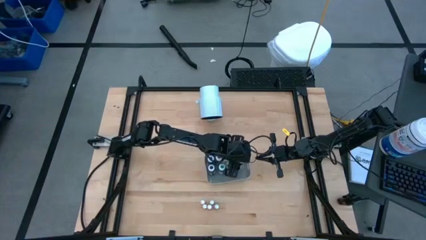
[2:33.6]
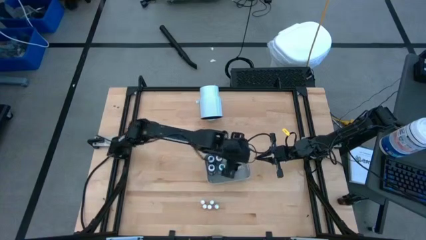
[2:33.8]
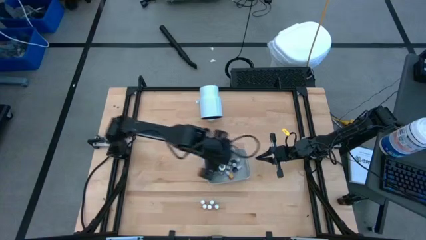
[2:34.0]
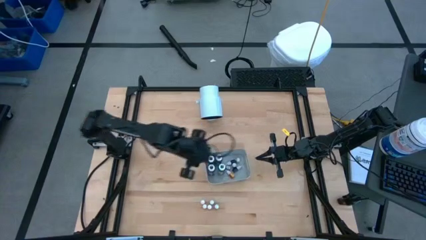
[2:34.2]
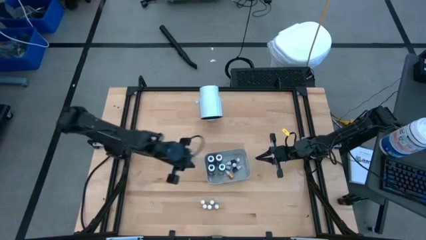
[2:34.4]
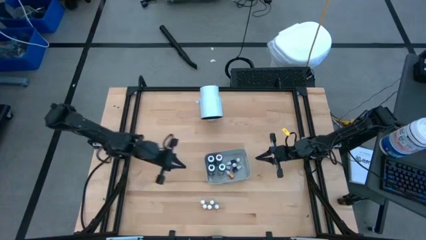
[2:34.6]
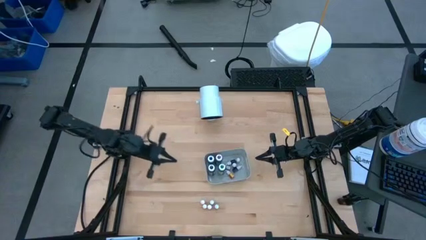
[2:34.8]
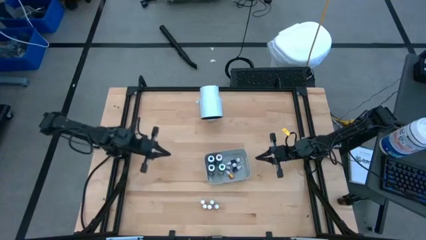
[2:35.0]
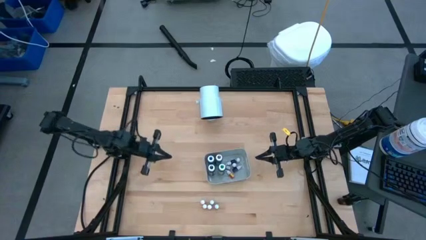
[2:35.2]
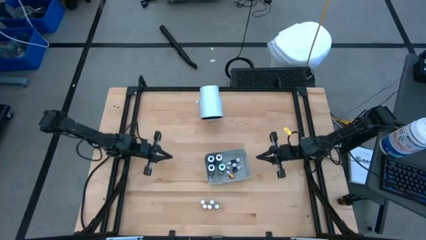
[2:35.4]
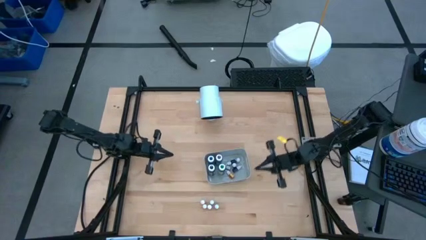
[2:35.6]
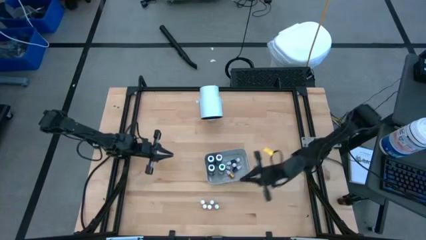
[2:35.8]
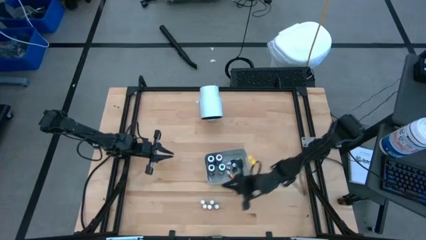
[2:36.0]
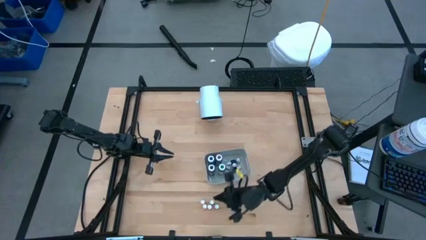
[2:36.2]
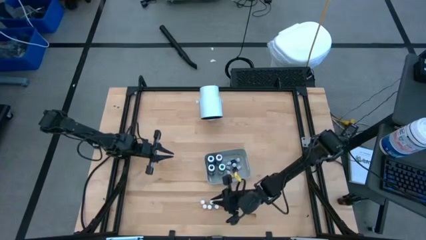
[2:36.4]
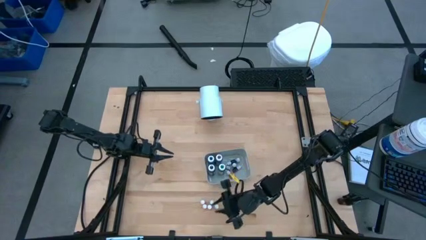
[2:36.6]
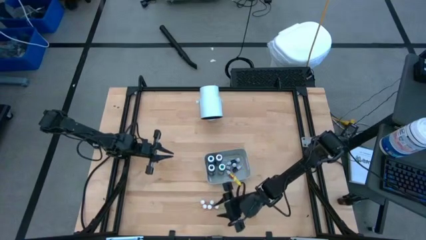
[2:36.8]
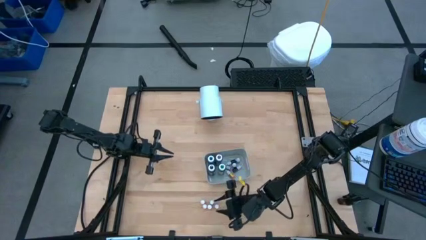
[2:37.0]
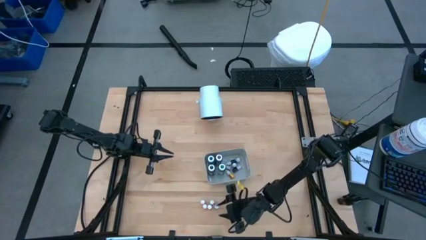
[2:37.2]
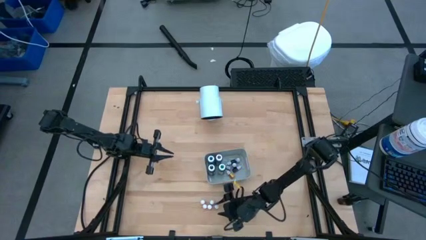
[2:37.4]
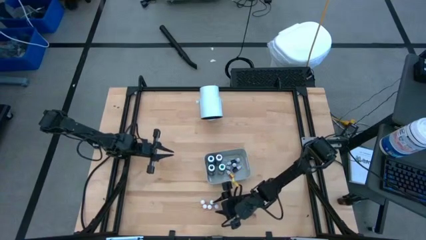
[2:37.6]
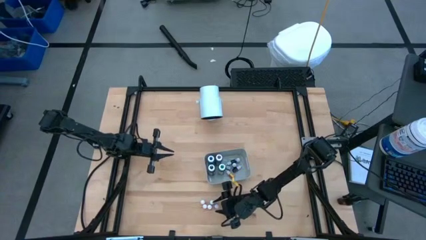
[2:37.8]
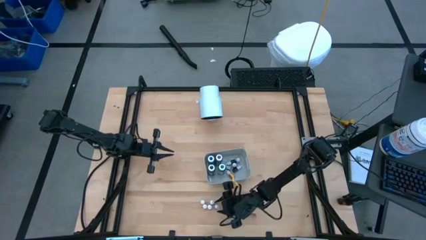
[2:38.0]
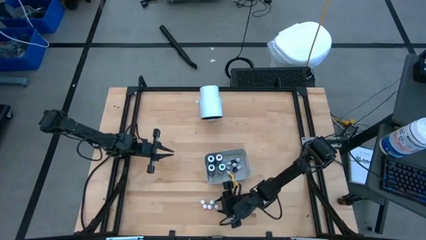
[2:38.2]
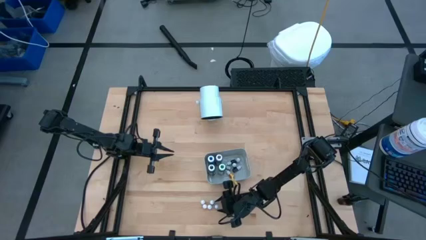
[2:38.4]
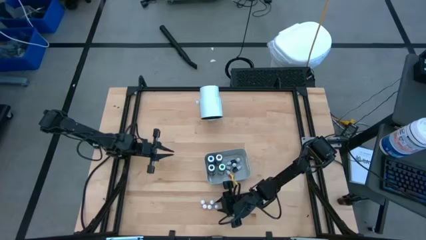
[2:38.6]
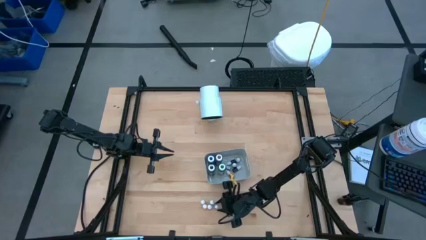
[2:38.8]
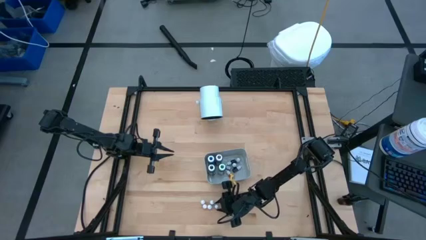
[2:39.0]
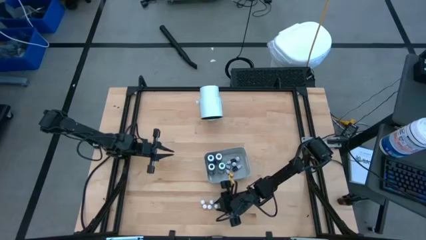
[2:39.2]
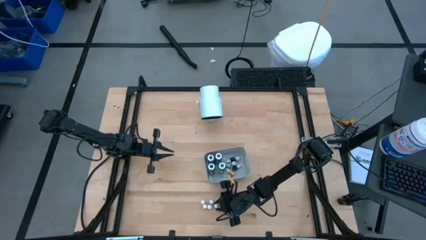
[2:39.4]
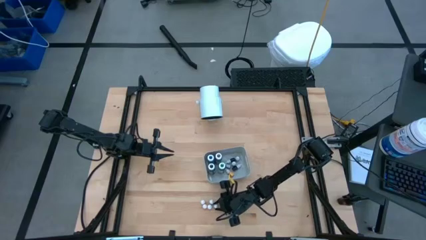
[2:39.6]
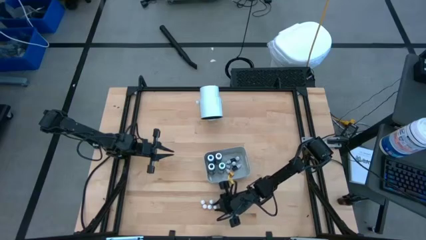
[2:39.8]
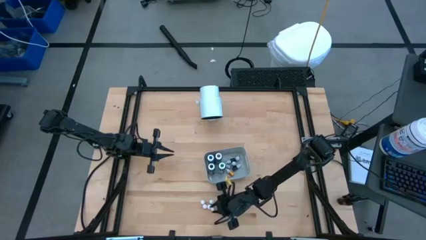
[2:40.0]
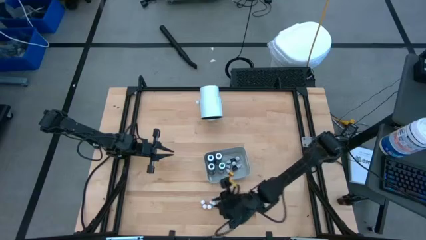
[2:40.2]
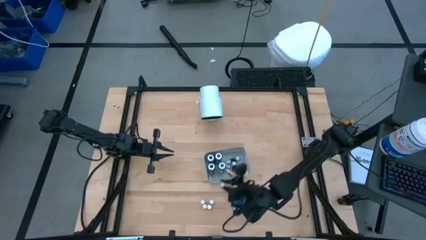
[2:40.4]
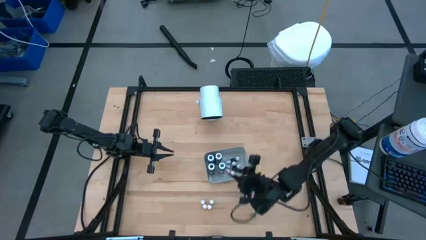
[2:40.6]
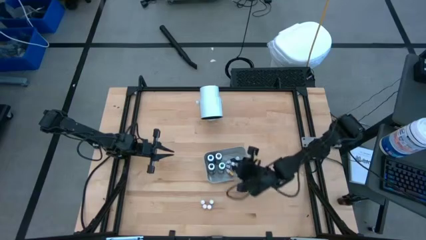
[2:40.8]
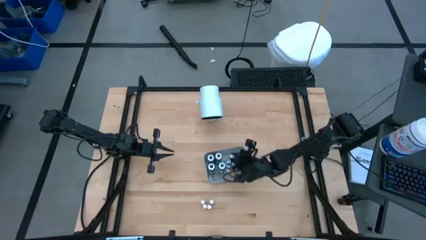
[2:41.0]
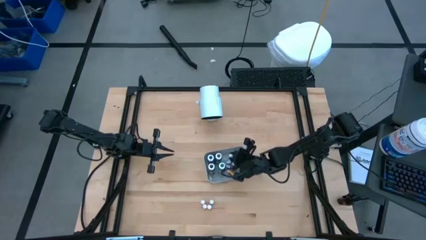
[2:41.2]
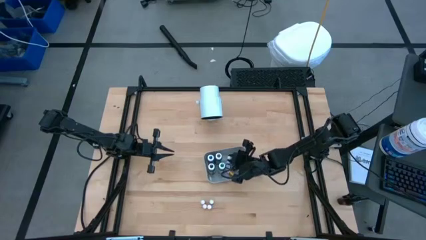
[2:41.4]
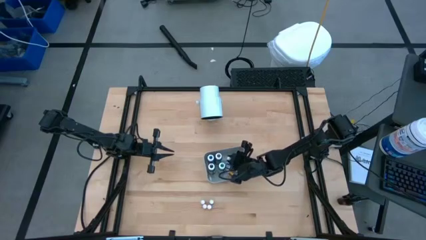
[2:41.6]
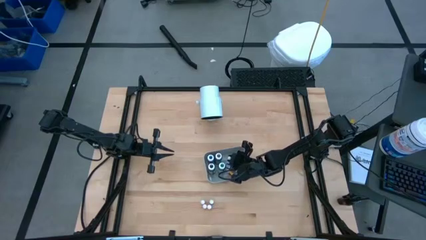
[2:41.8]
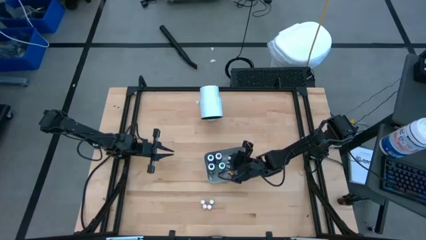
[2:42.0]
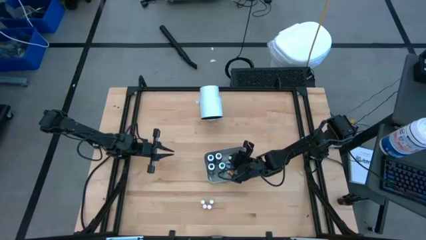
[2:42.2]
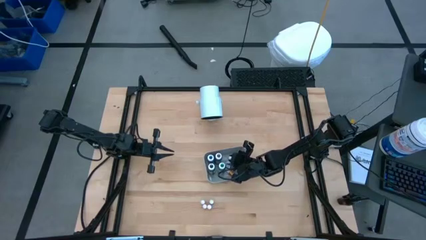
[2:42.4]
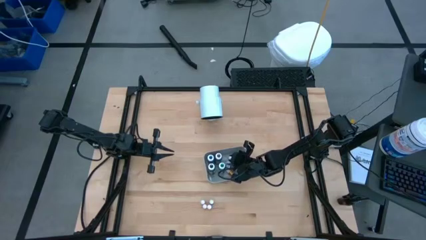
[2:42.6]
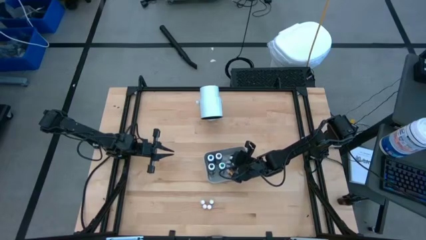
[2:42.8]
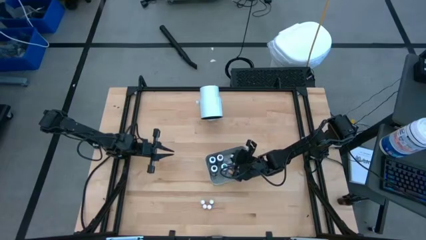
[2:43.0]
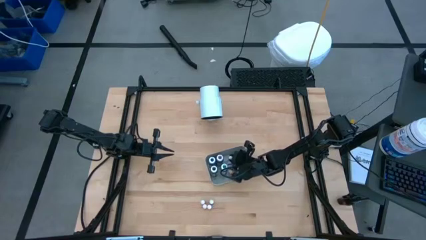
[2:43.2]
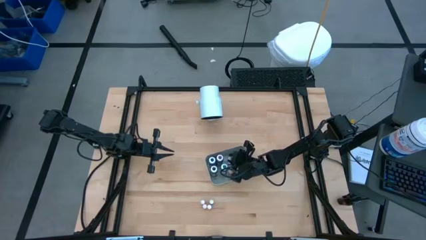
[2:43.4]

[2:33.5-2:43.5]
Task: Pick & Place food coloring
Put the small green food coloring bottle into the gray bin

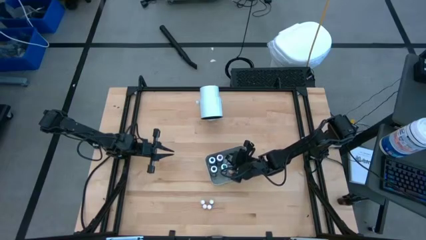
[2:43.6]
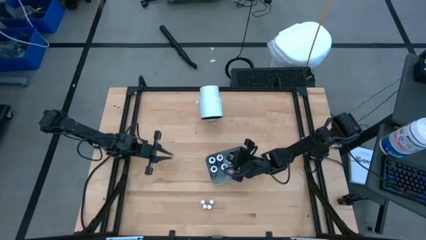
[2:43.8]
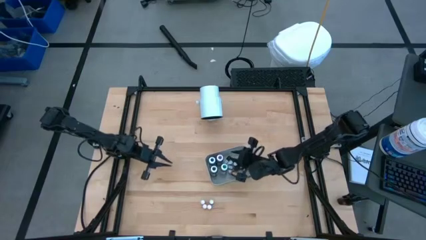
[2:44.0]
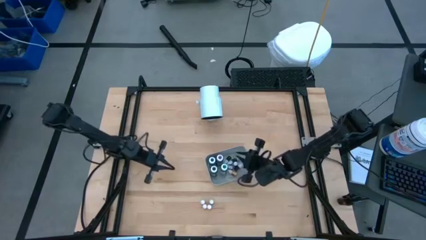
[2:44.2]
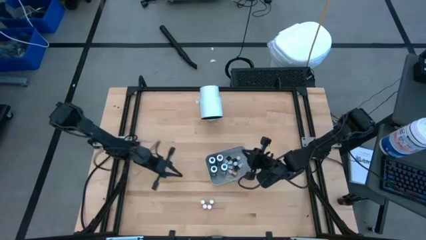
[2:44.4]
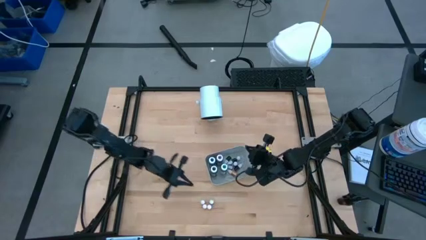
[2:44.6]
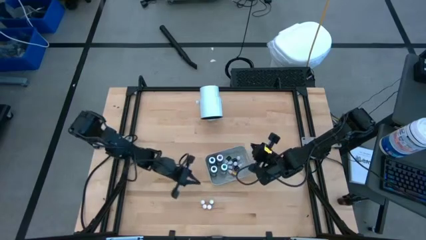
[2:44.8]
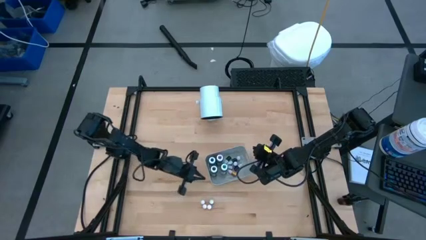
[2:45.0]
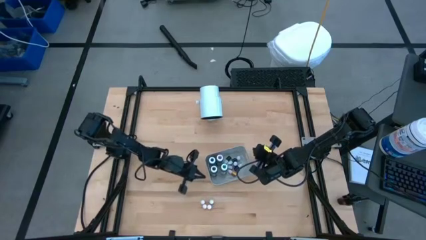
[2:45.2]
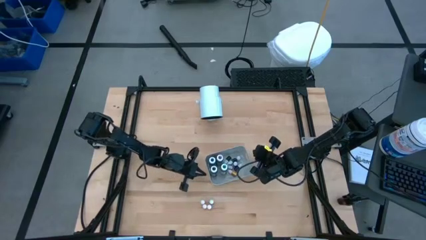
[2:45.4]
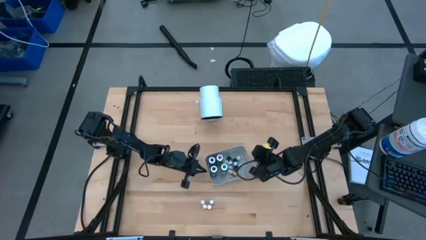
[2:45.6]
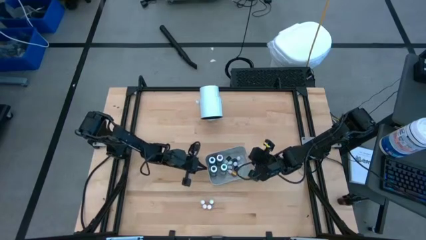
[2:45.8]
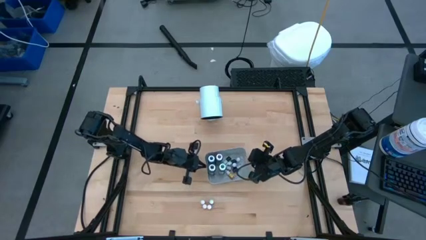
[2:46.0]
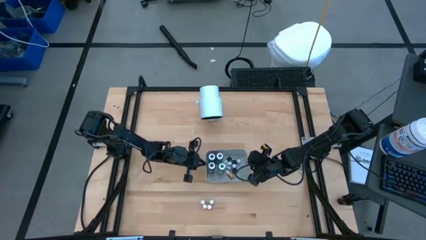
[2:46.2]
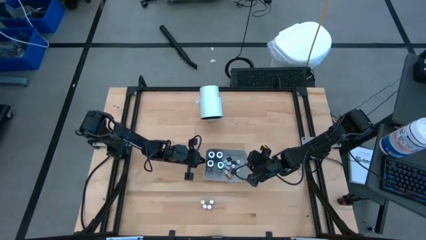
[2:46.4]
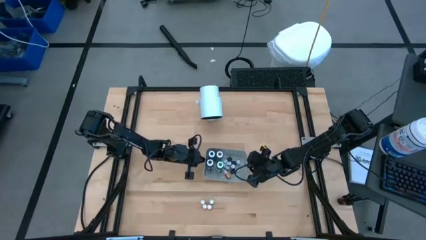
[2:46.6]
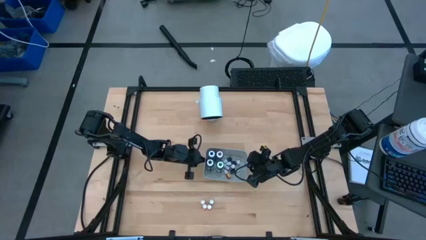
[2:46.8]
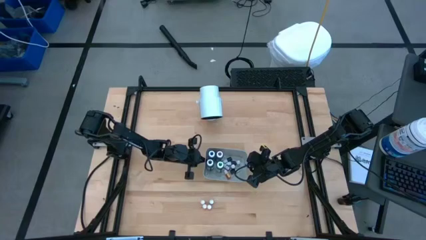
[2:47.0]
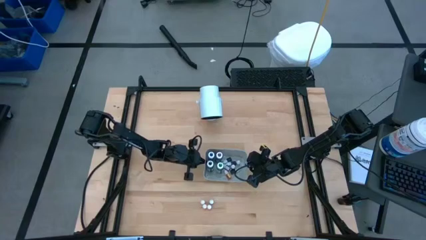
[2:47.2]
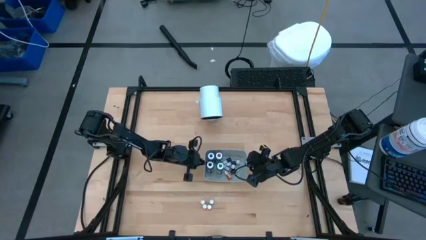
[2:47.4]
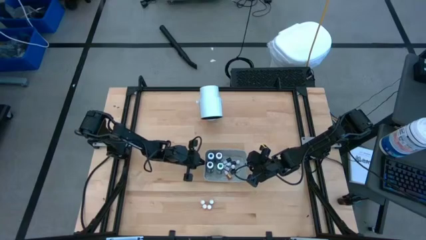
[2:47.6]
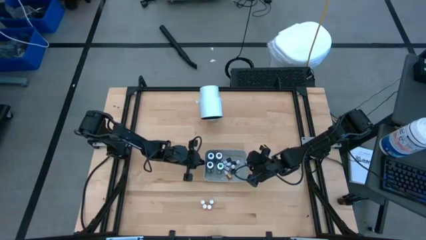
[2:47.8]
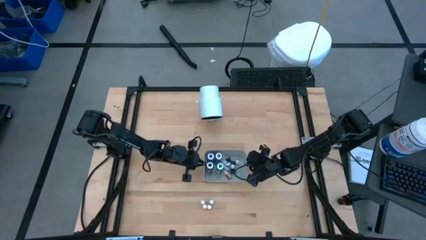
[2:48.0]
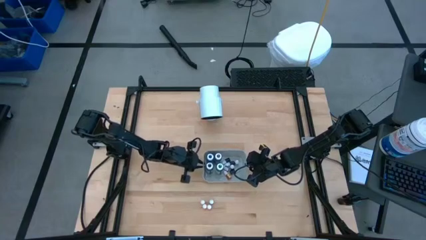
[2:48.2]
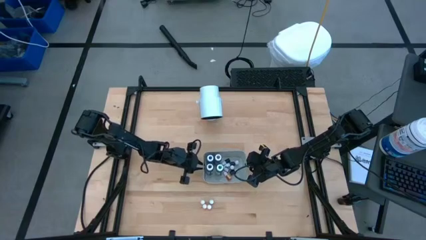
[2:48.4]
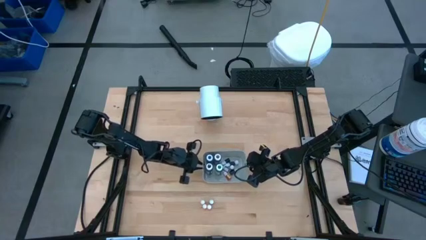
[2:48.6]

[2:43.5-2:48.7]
Adjust the gray bin
